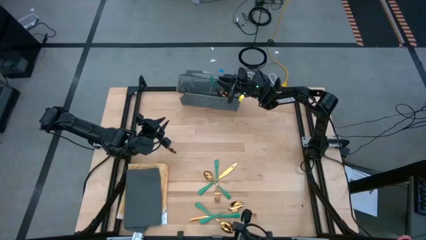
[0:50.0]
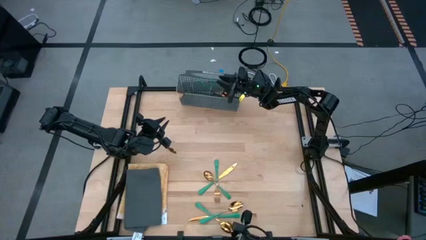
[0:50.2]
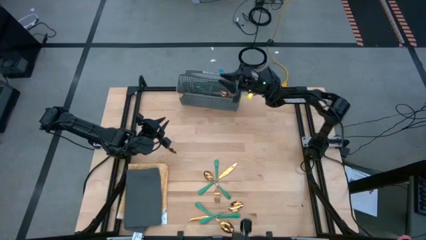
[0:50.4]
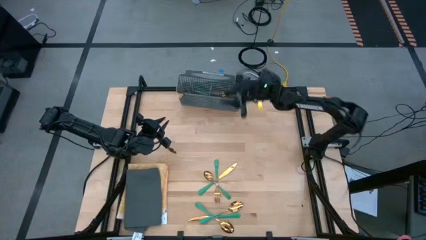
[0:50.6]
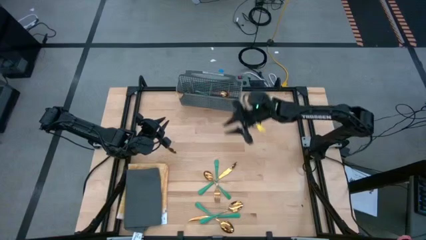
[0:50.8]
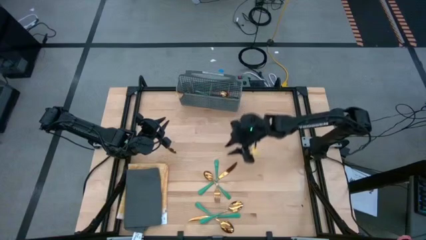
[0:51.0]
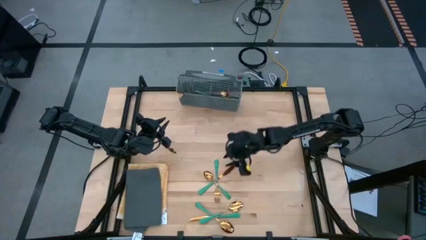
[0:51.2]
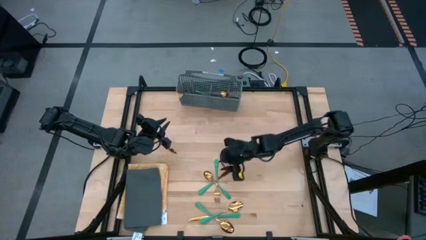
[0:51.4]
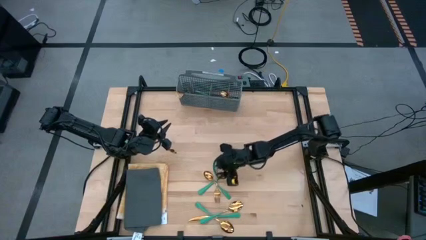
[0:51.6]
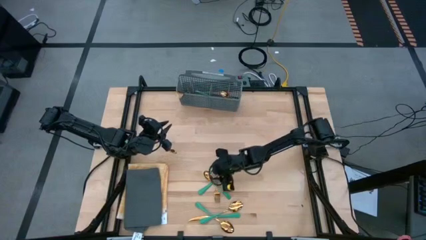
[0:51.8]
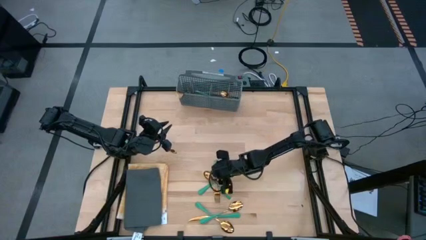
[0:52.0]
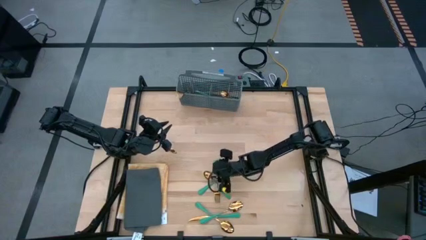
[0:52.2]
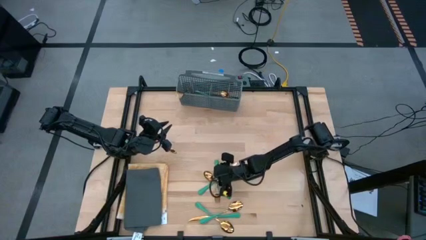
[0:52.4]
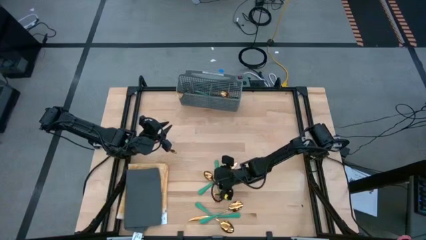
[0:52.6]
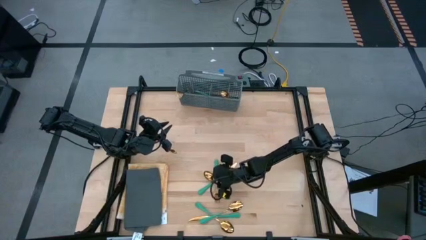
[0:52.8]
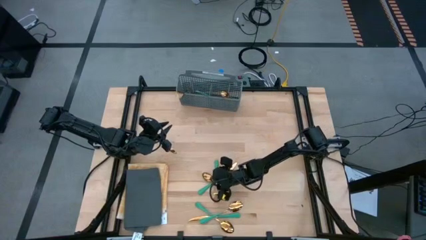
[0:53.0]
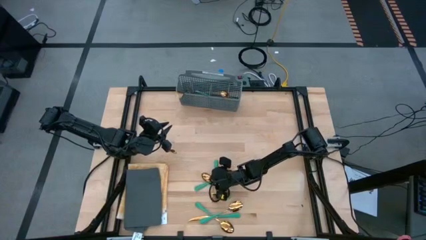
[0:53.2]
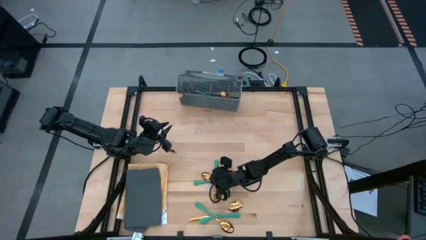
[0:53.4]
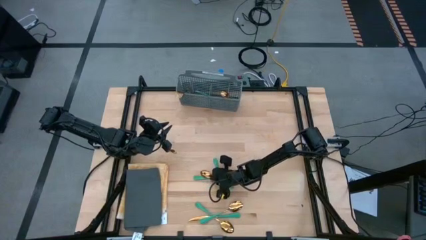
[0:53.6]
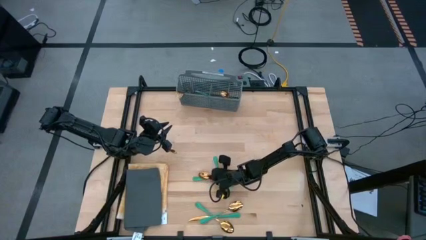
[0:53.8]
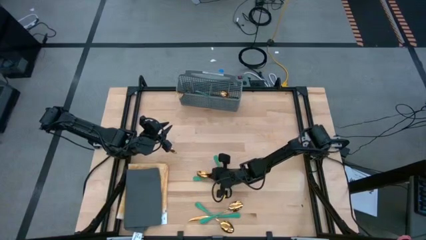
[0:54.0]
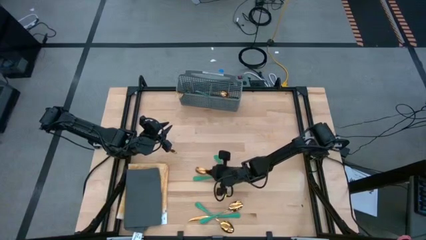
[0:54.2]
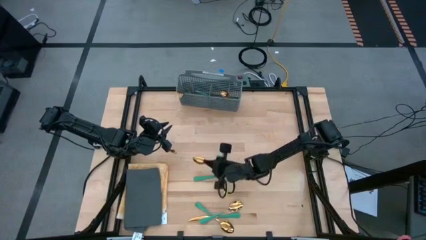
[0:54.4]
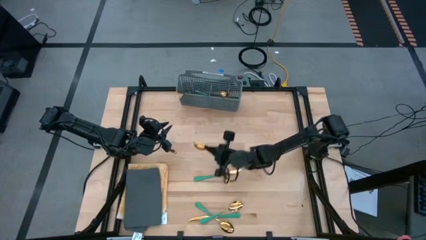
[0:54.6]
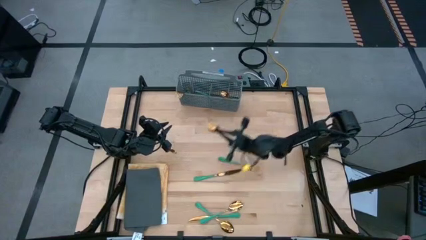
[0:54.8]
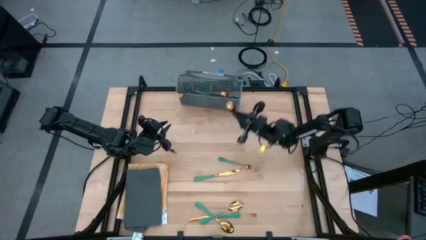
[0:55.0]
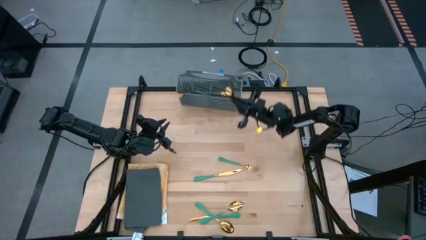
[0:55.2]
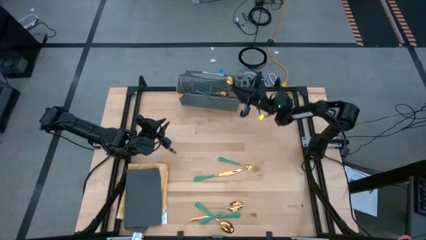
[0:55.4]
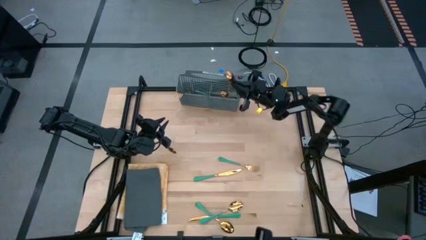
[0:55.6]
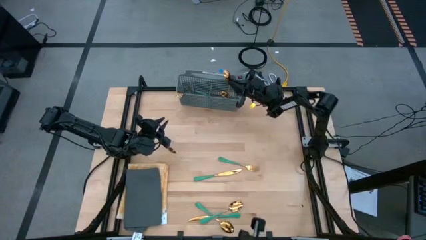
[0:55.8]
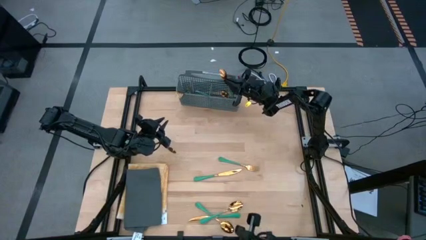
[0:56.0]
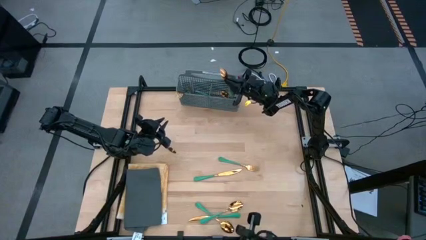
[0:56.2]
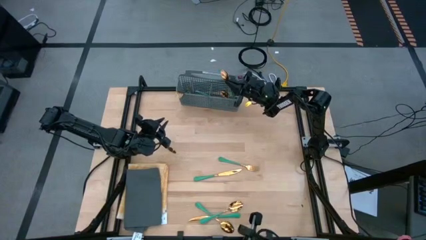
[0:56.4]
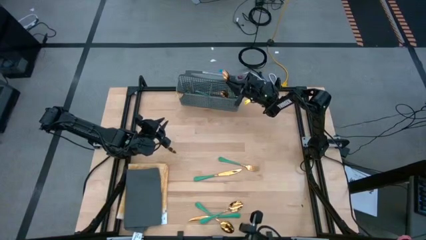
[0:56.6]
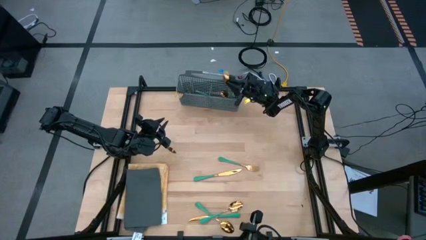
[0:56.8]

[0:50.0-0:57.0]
Task: Sort silverware
Put the green spoon into the gray silverware basket

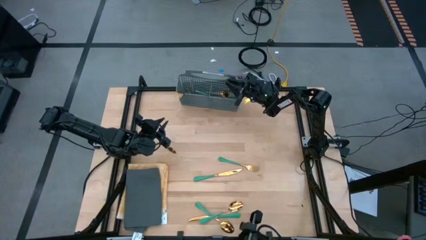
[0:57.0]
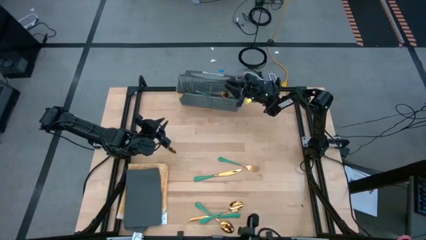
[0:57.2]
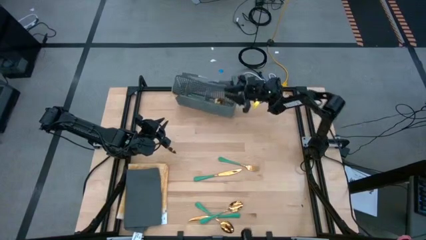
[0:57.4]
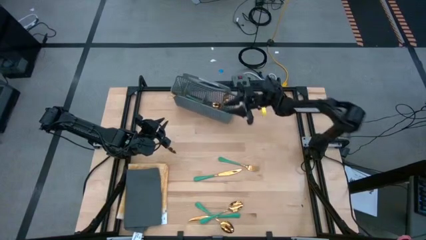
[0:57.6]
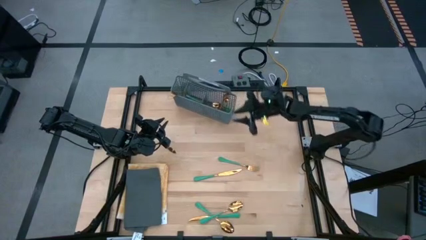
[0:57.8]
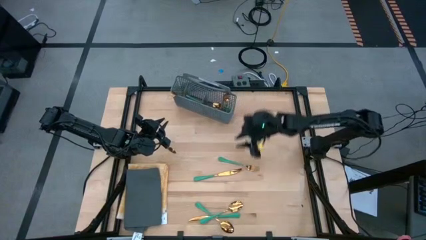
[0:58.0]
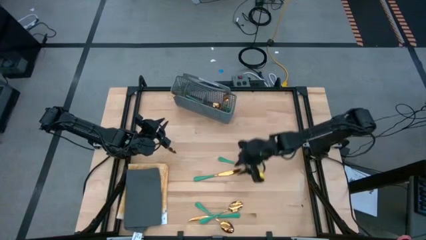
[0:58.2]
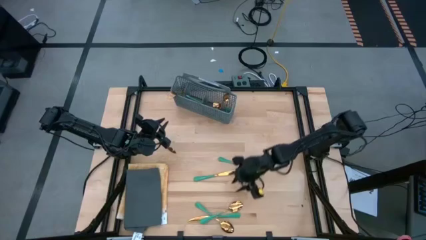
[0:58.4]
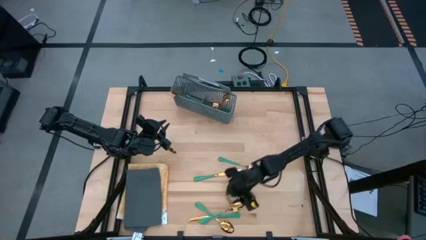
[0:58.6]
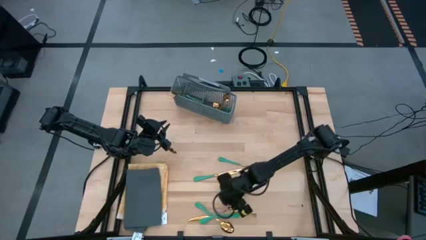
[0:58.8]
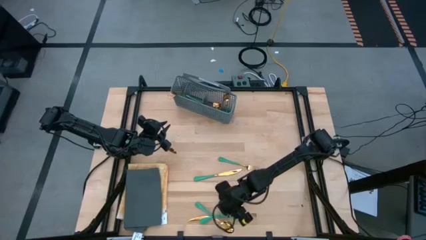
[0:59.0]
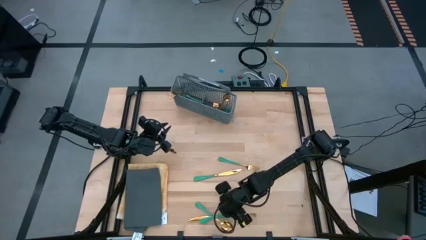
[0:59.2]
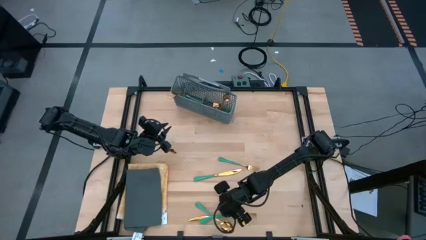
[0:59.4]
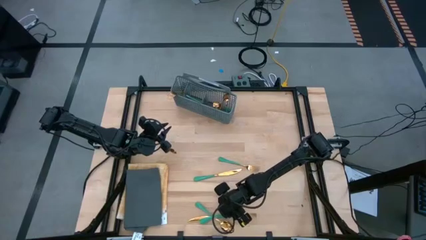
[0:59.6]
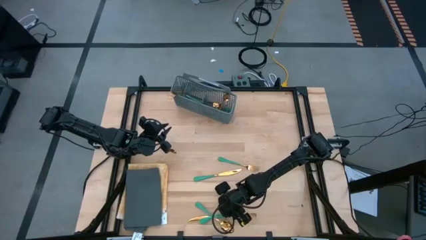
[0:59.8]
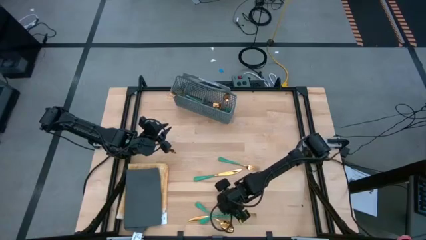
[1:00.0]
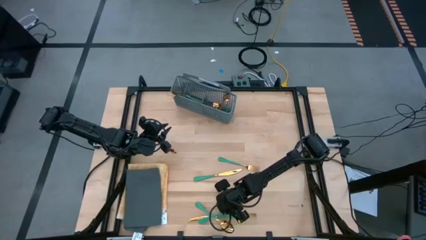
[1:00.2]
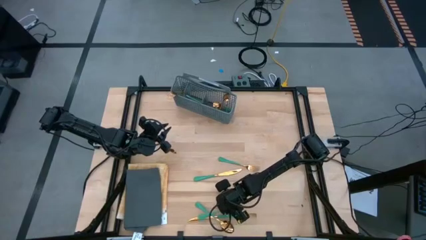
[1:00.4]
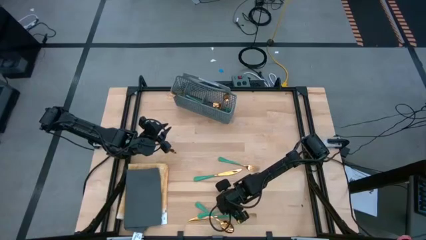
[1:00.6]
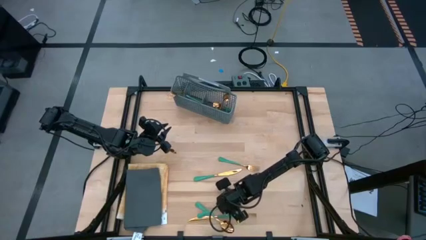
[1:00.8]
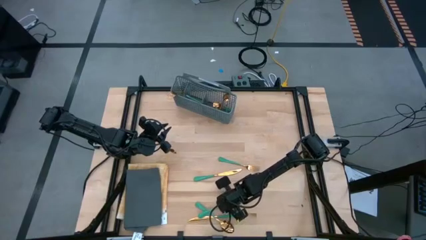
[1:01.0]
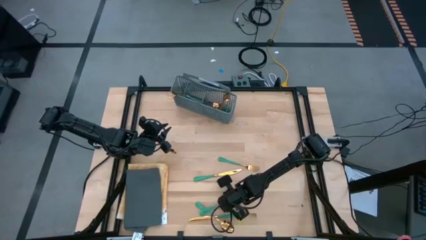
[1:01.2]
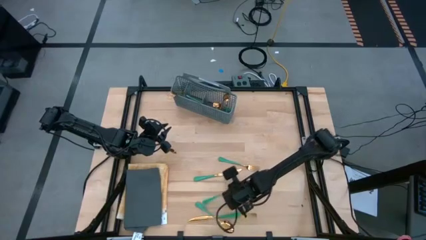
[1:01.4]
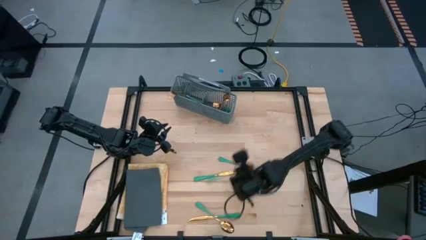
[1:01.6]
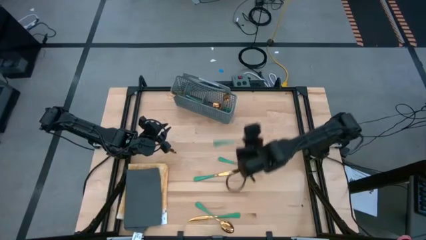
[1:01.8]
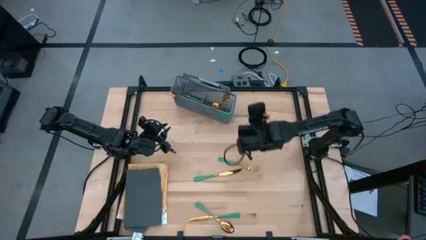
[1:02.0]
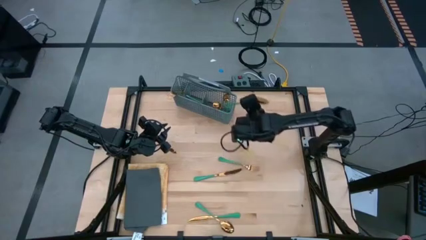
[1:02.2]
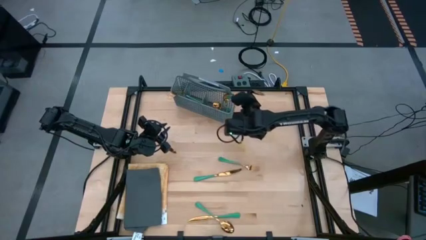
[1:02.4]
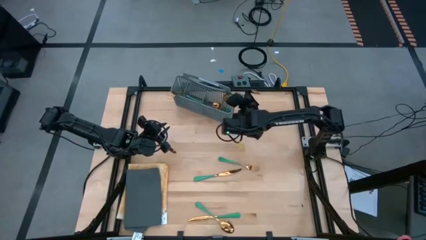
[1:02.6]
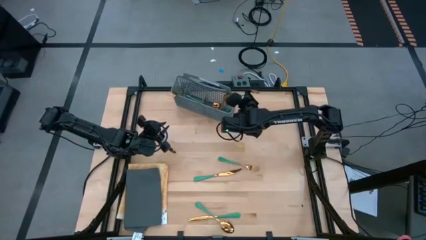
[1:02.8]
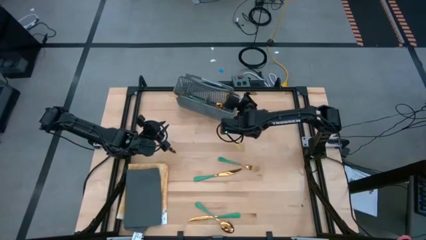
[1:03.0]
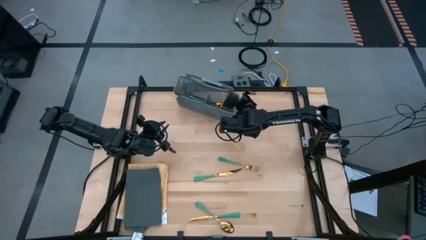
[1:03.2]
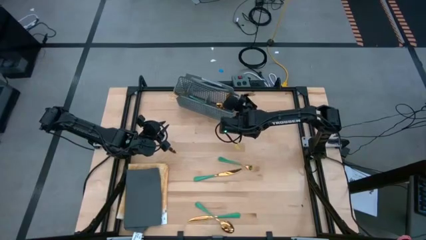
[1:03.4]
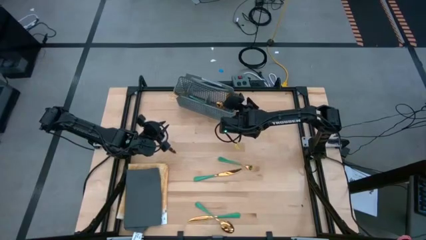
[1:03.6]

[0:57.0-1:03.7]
Put the spoon into the gray silverware basket

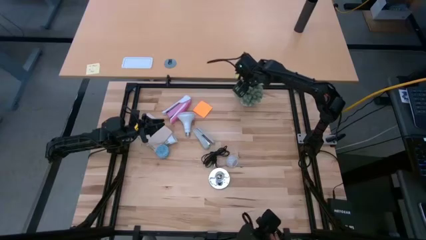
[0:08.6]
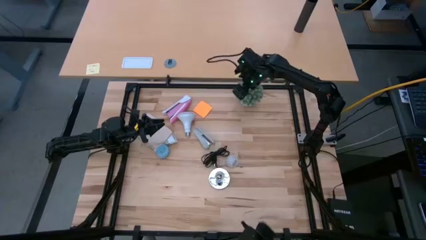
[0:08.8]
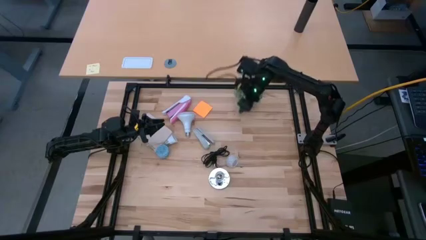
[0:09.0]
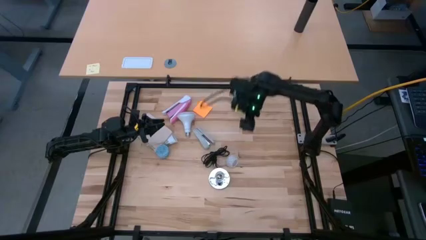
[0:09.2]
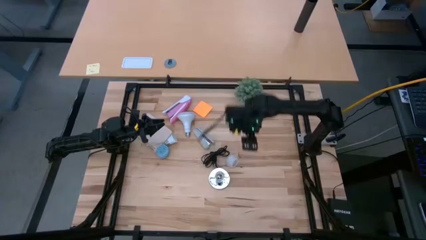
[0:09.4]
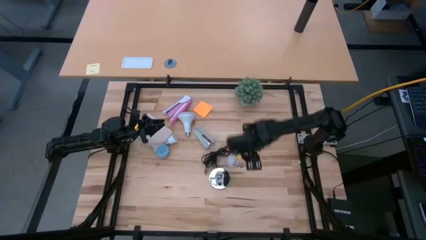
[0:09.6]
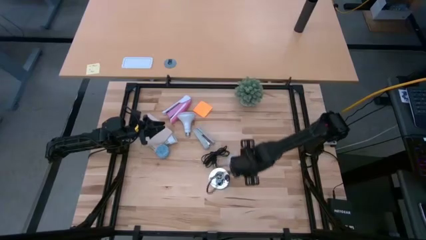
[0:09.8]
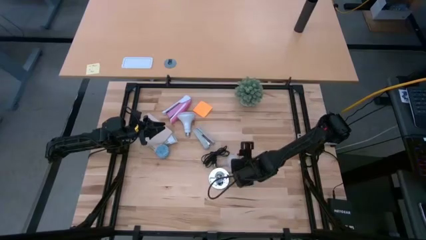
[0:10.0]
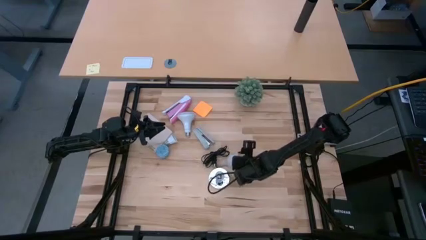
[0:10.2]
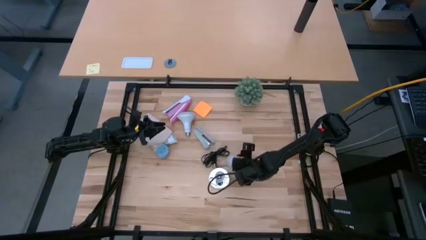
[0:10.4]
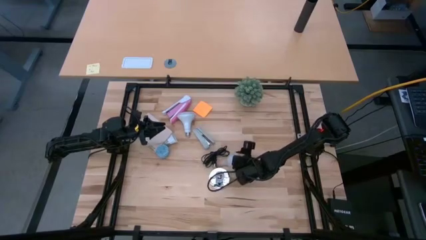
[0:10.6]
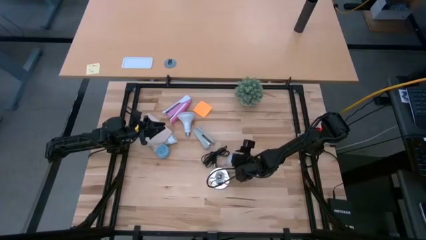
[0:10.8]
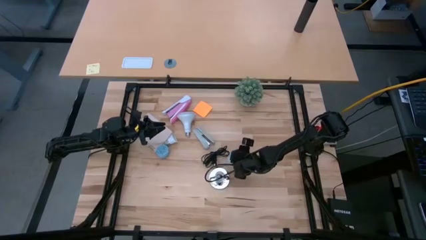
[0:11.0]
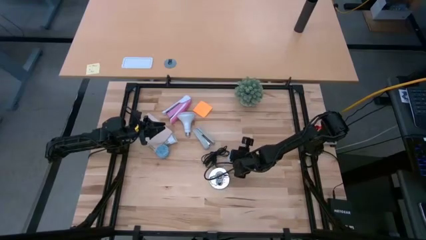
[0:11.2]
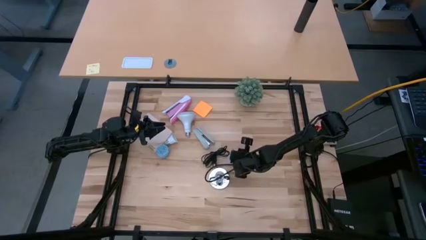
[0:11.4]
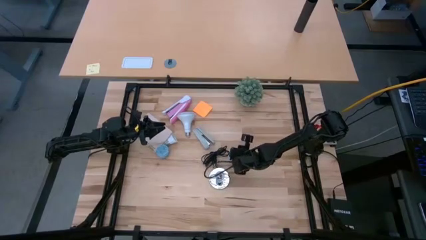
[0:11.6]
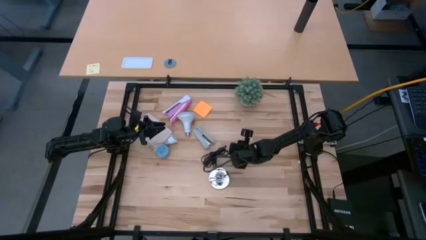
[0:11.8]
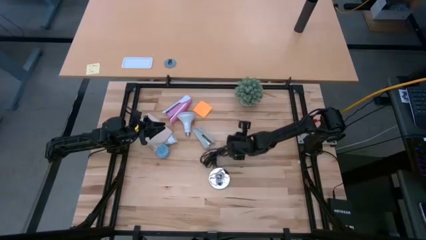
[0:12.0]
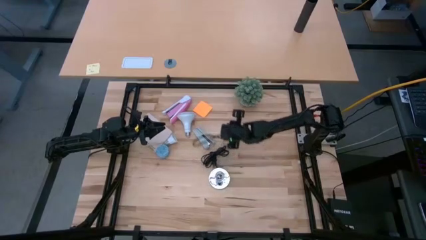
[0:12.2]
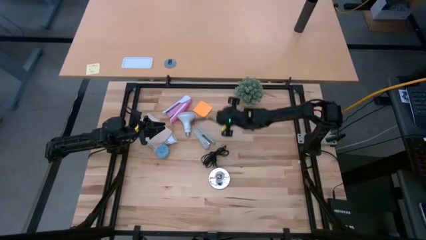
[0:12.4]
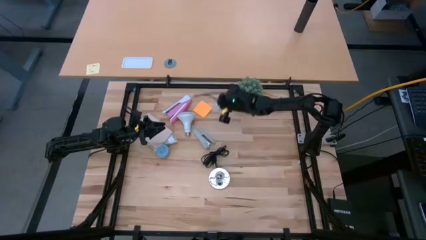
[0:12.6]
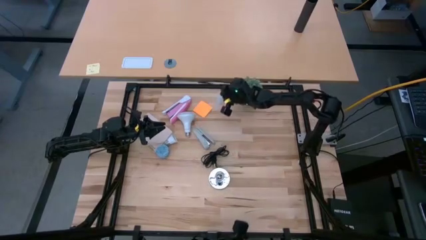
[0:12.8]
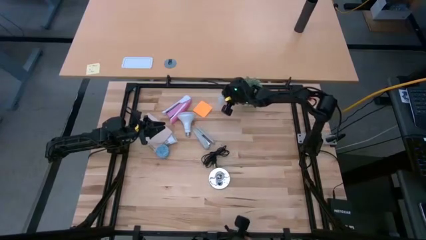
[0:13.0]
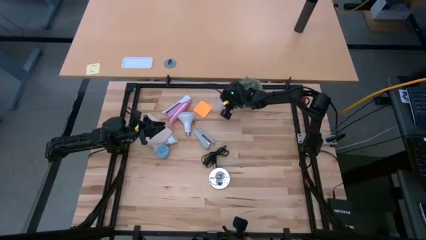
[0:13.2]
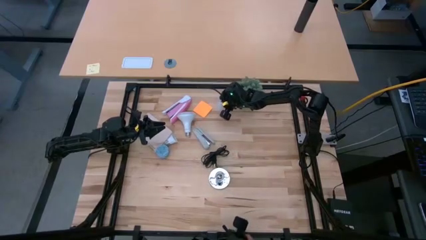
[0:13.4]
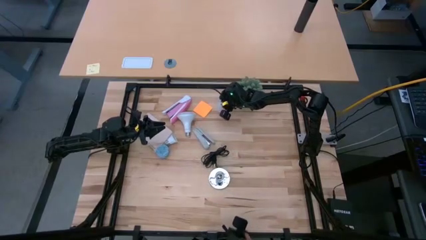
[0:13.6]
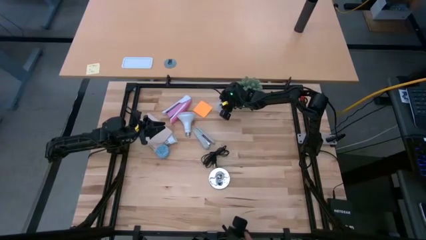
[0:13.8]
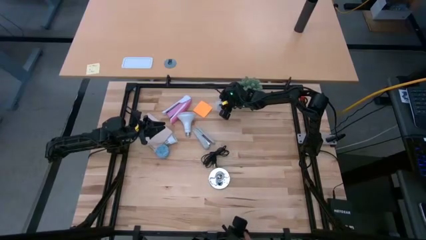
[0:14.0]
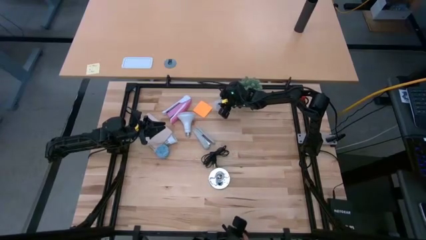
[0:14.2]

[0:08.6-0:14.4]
Task: Screw lightbulb
Move the led bulb cover to the top center of the table
